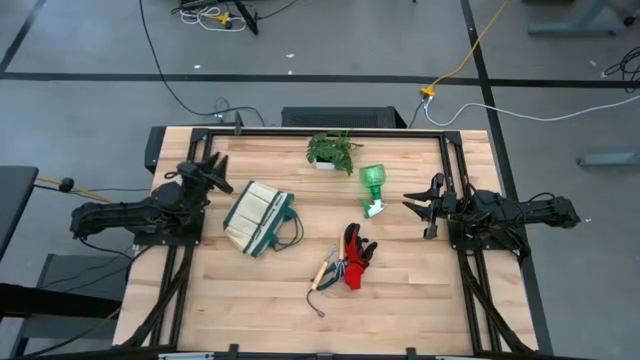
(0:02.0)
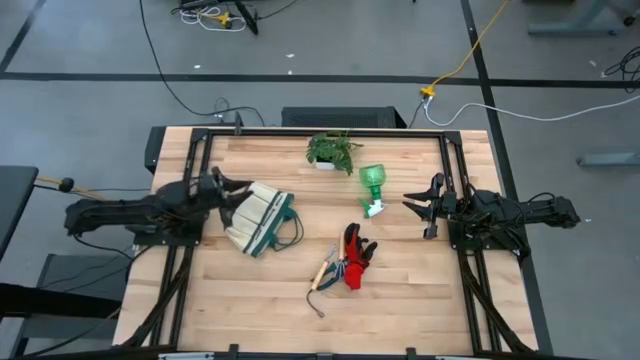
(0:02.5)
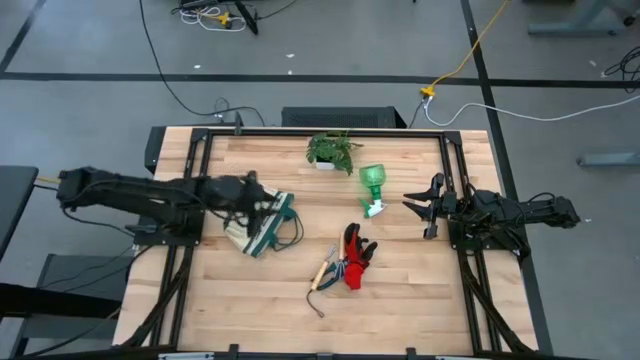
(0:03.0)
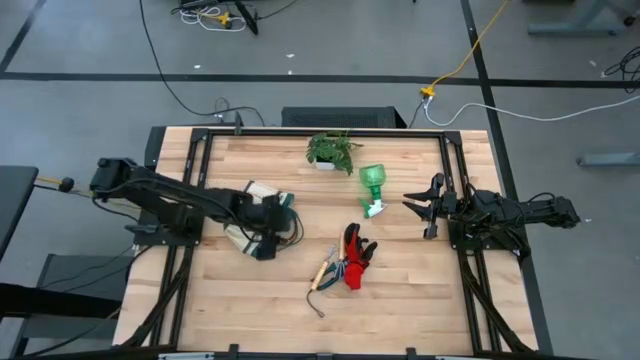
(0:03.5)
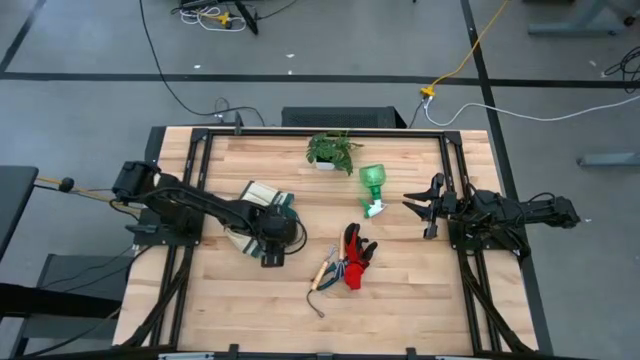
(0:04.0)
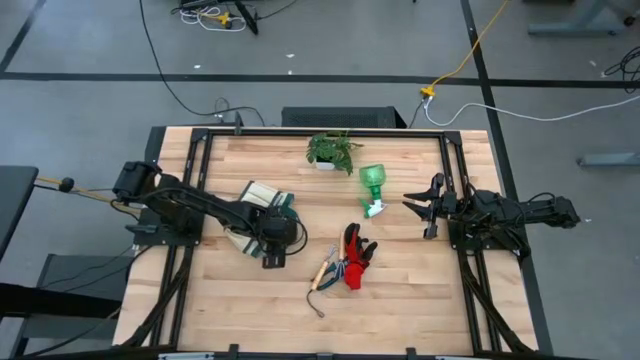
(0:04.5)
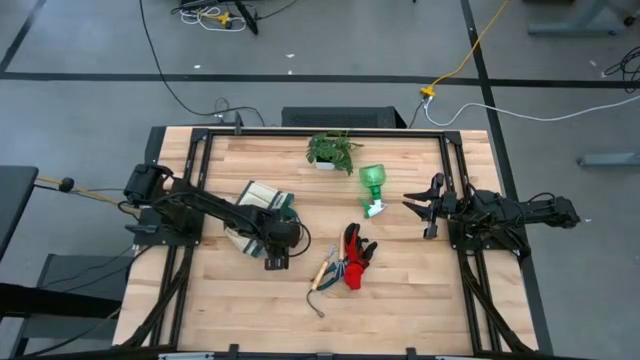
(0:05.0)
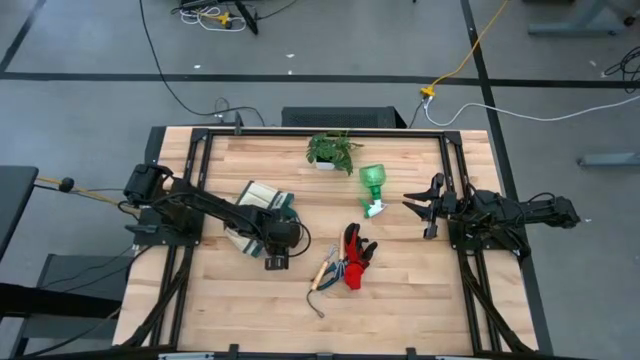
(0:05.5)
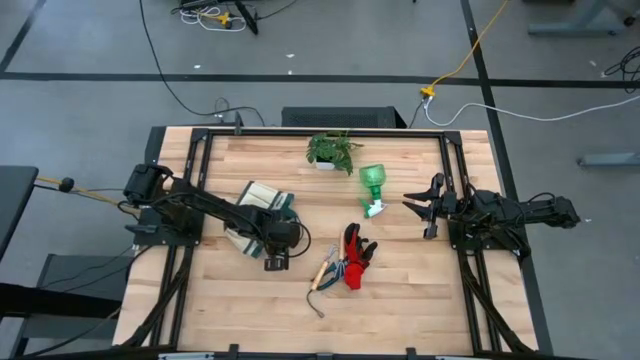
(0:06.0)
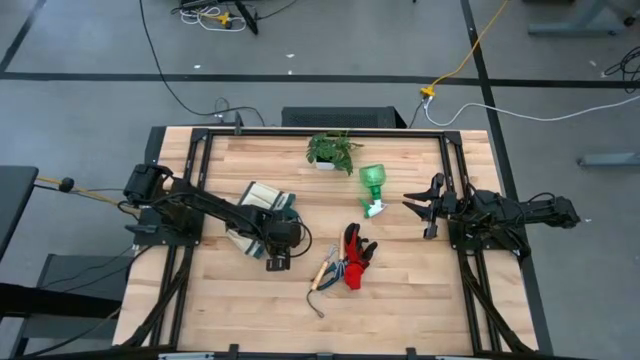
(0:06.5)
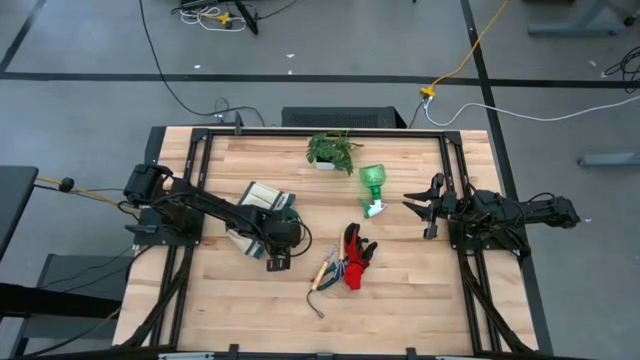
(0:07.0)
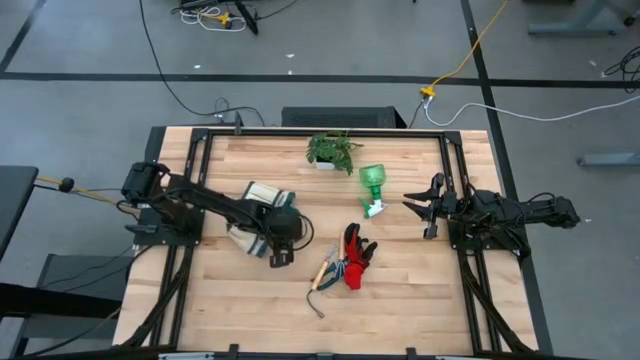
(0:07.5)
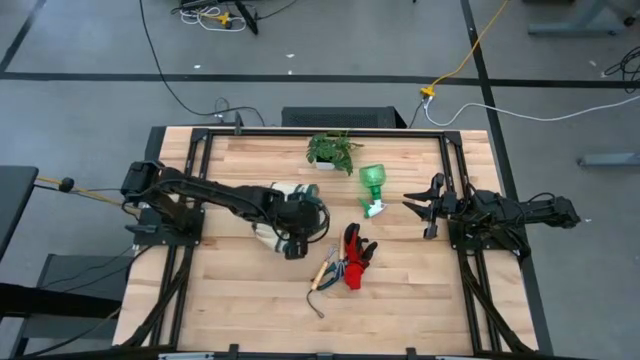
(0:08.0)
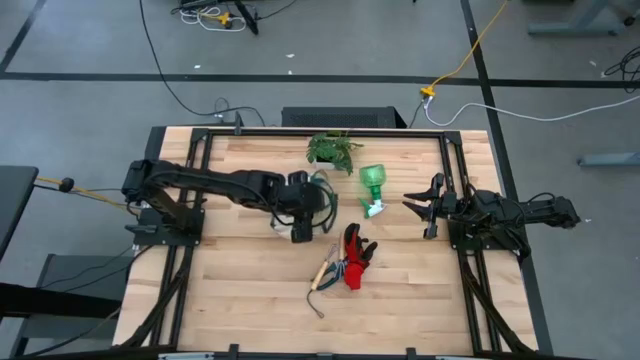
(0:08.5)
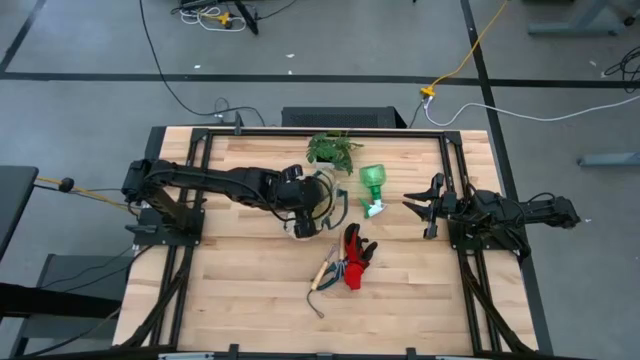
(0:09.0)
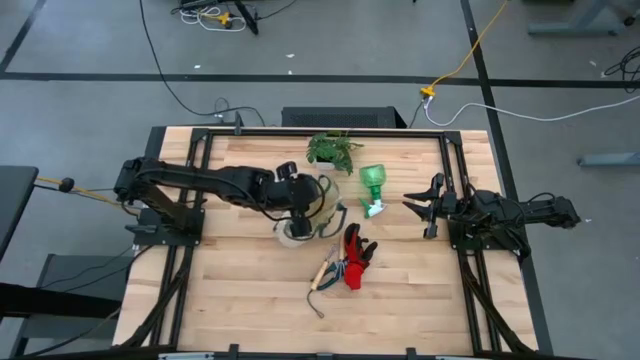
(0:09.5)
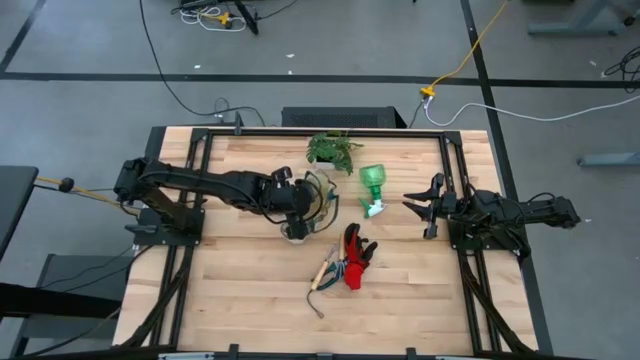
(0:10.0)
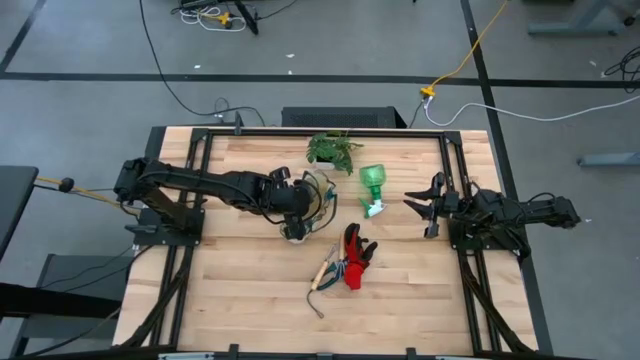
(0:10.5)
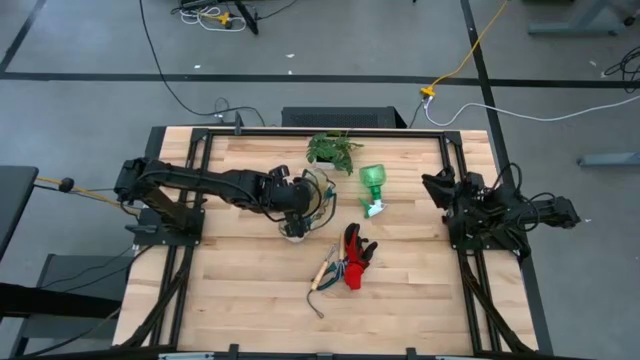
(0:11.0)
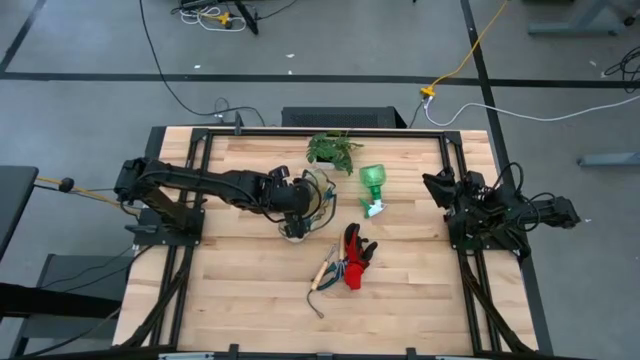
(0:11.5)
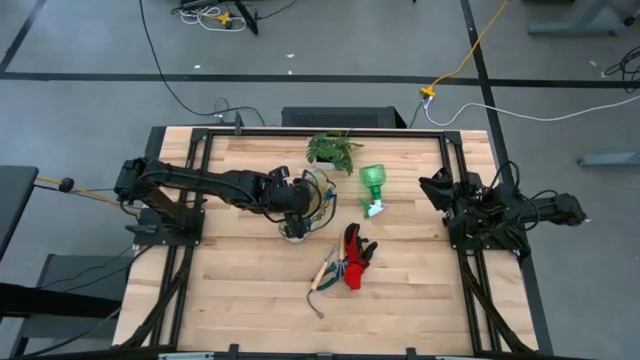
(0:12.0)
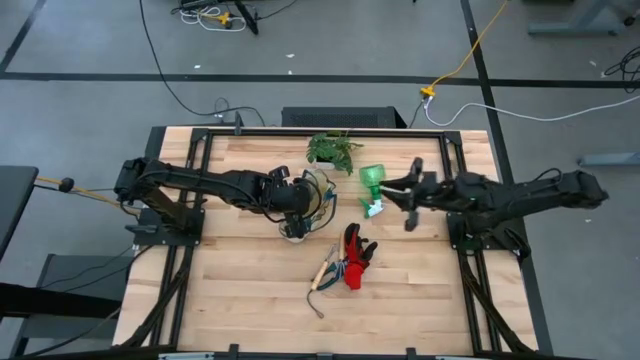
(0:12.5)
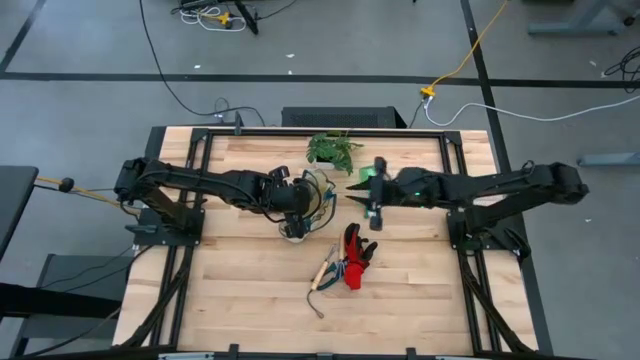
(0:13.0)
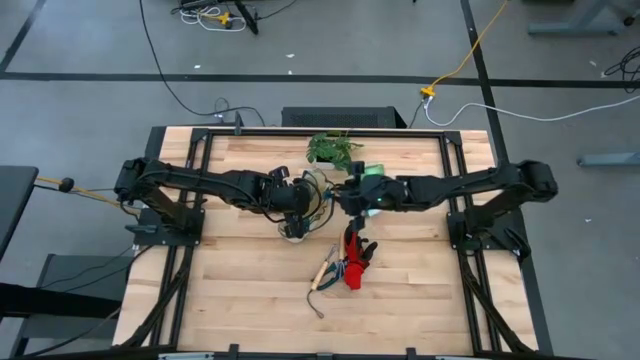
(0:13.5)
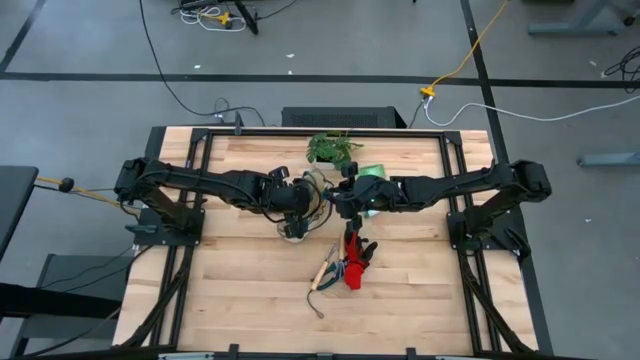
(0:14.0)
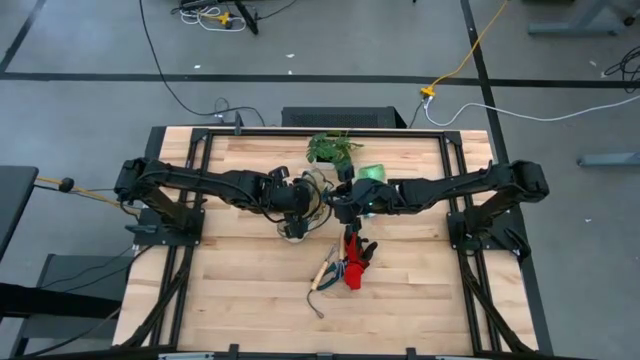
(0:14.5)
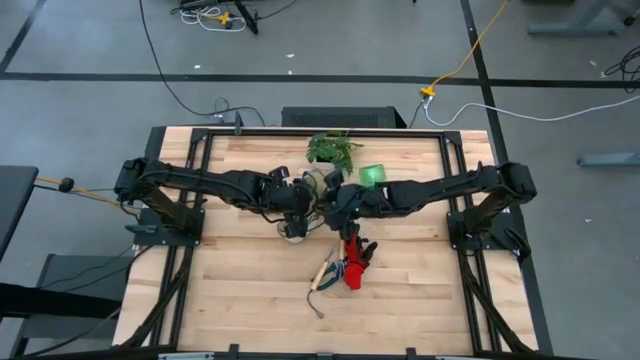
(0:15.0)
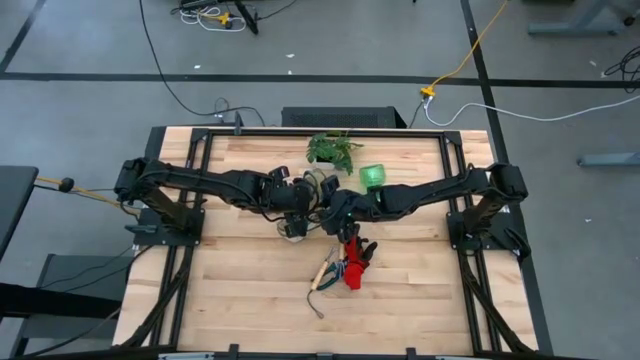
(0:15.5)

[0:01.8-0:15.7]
Task: Pick & Place Garden tools in Gardening bag
Prepare the white gardening bag

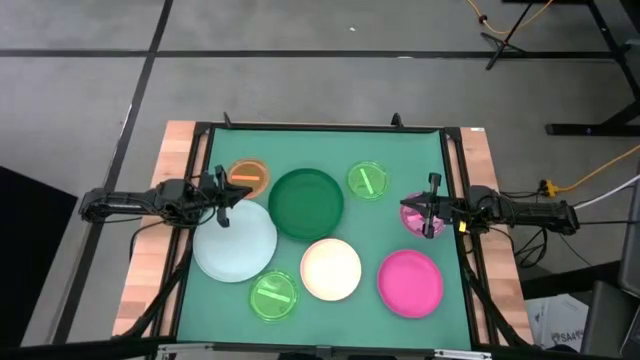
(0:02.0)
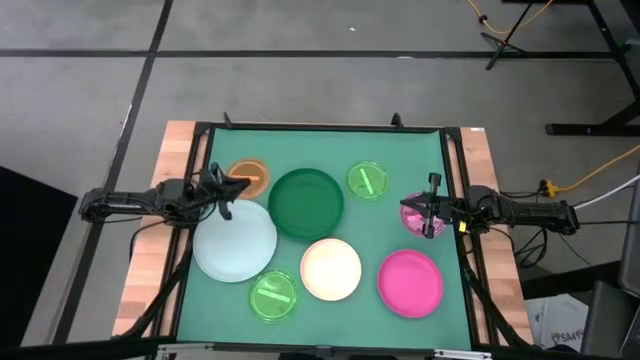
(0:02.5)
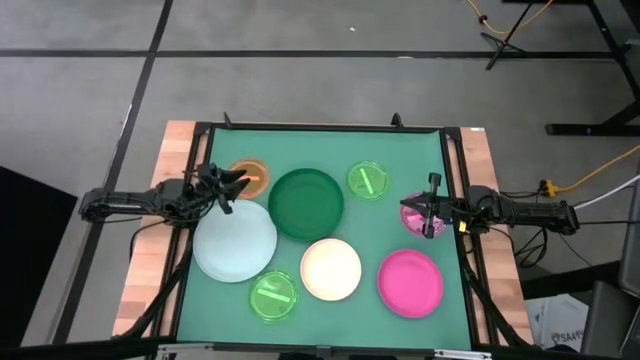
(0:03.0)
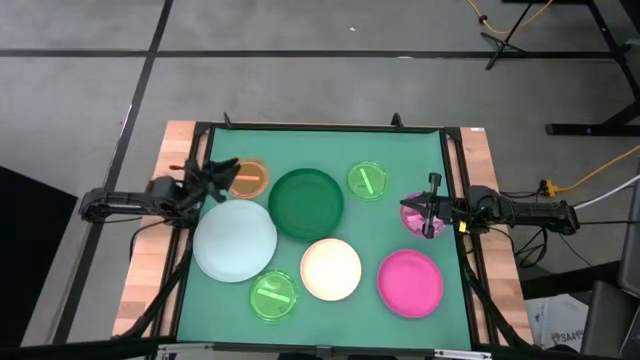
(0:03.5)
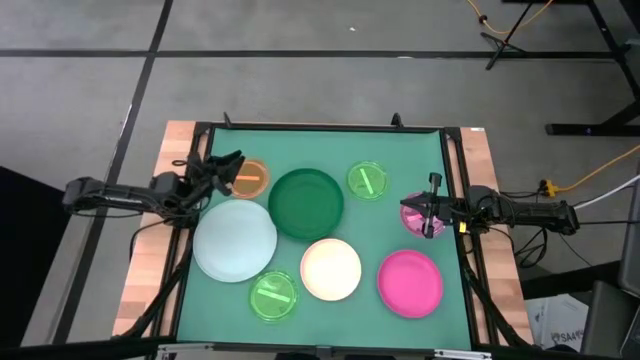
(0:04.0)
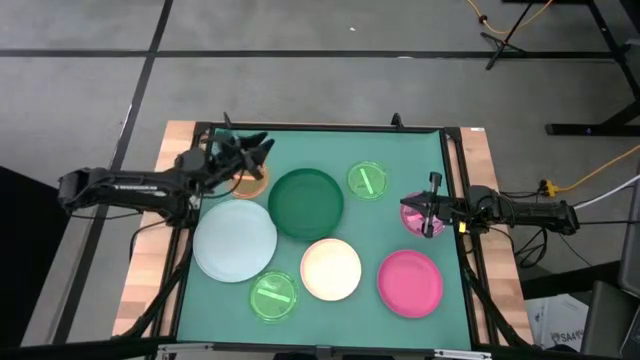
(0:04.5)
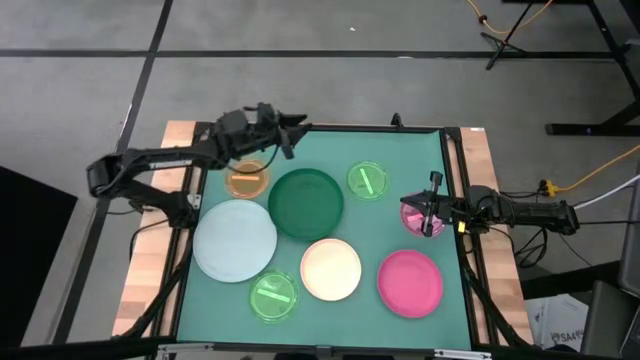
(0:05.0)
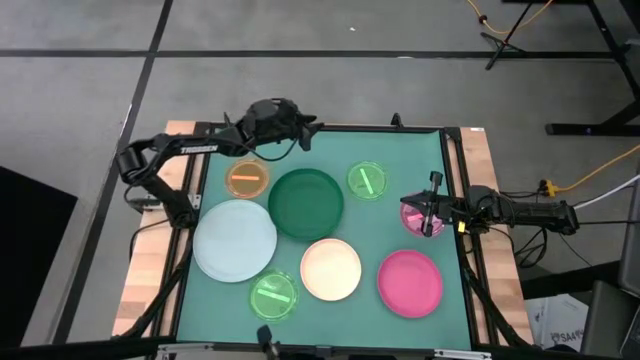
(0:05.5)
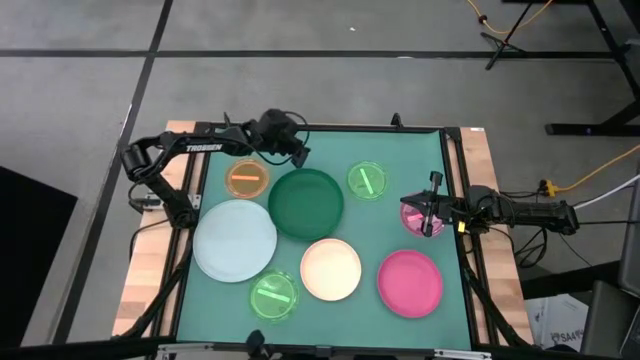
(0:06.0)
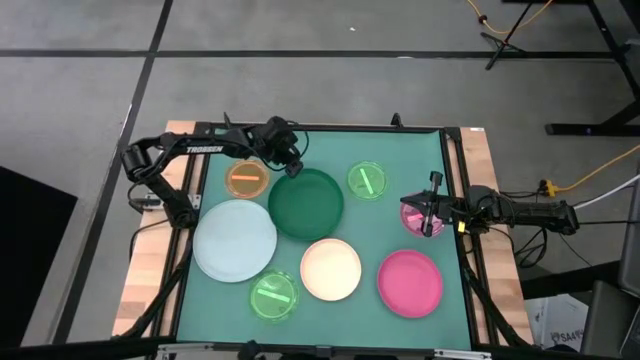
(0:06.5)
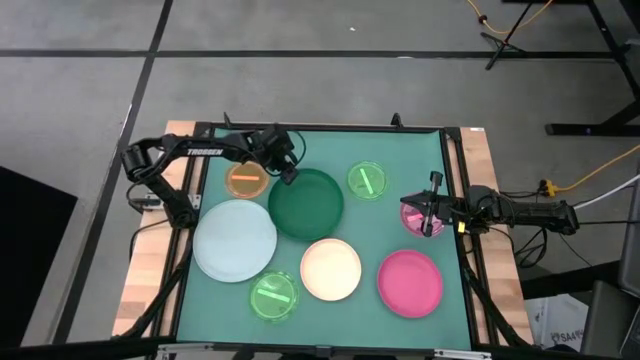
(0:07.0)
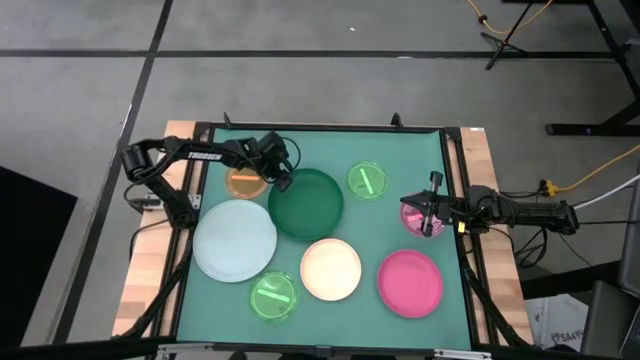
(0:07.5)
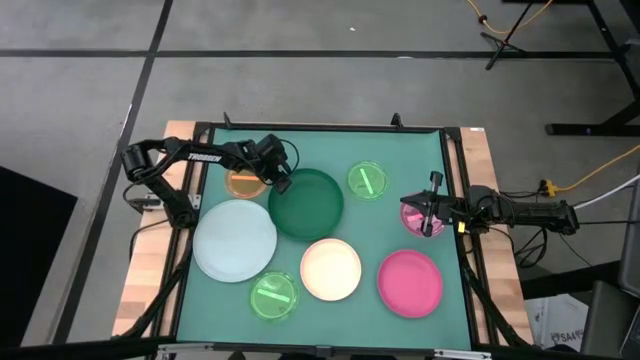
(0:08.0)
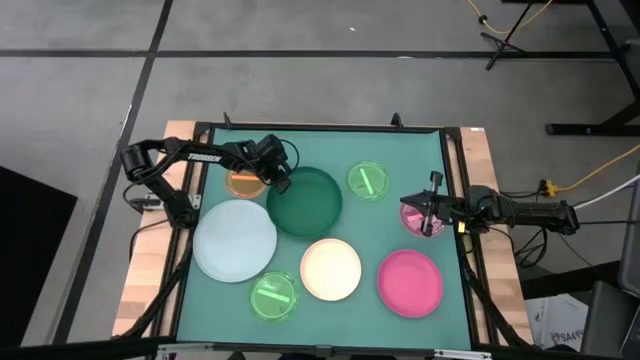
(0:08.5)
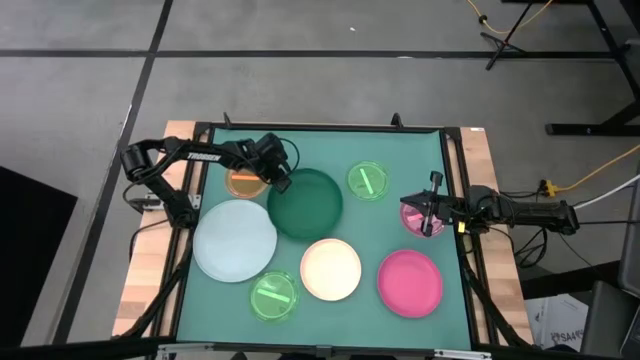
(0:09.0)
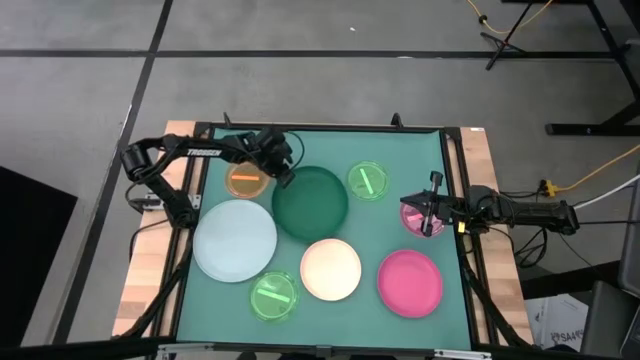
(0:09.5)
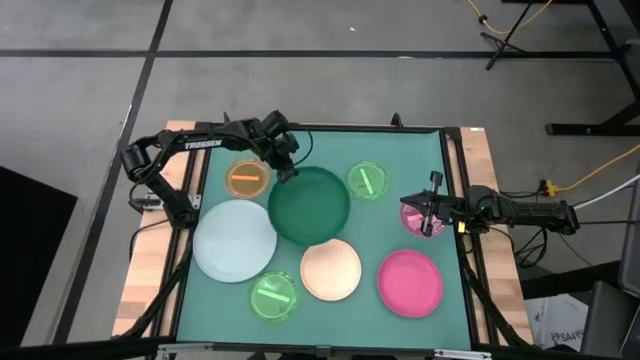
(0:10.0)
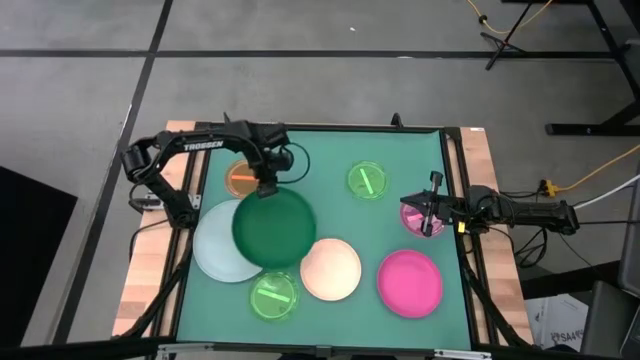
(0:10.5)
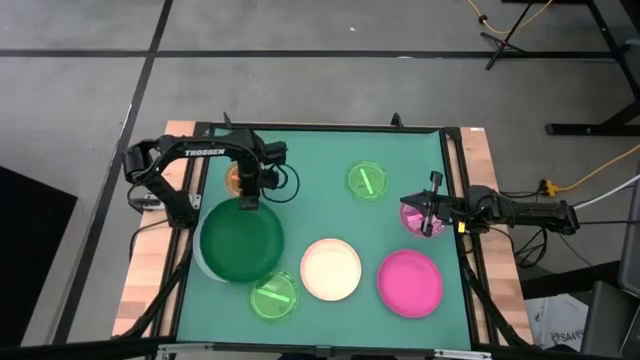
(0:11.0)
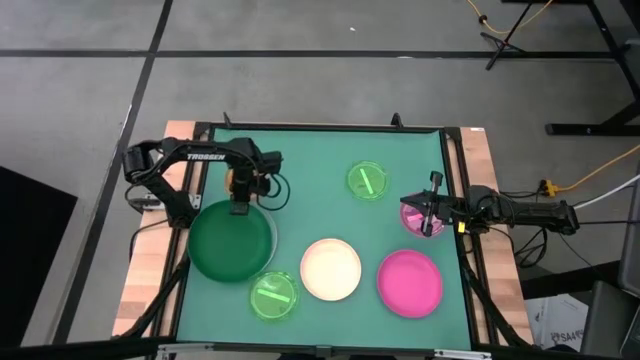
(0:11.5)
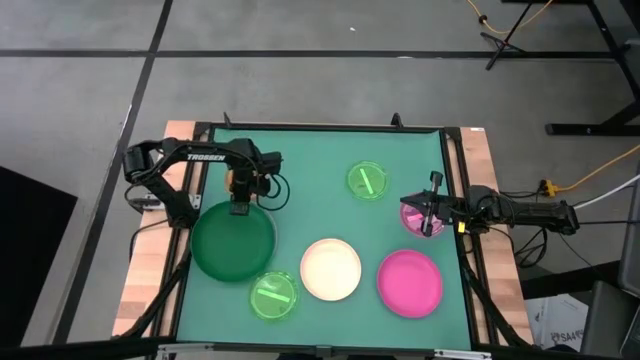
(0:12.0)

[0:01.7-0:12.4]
Task: Stack plastic plates
Stack the green plate on top of the gray plate
